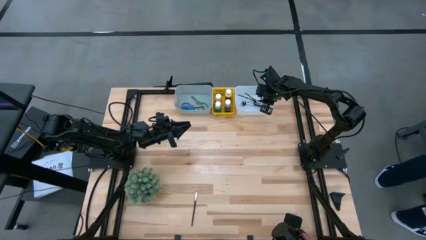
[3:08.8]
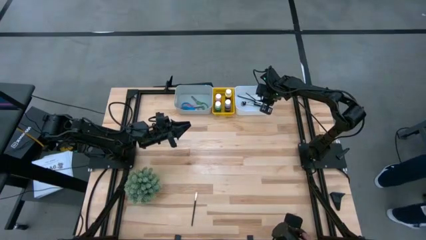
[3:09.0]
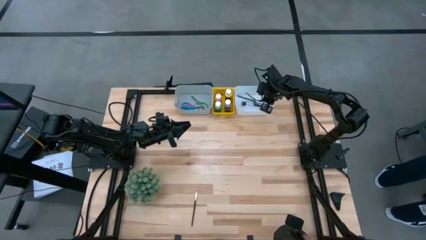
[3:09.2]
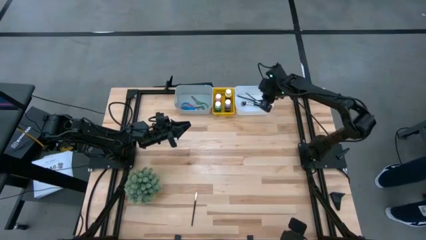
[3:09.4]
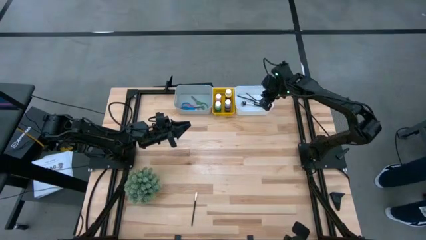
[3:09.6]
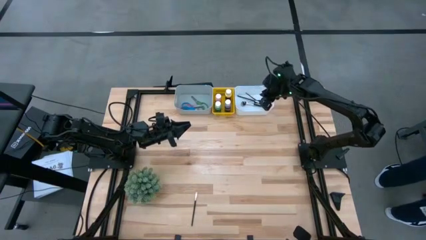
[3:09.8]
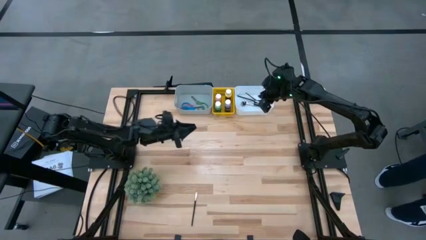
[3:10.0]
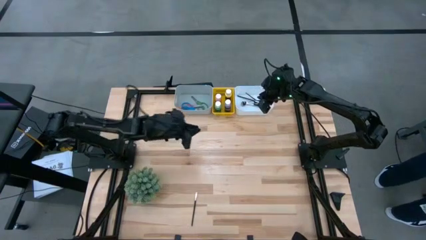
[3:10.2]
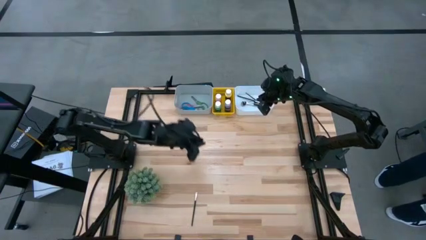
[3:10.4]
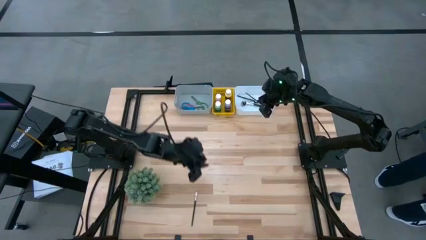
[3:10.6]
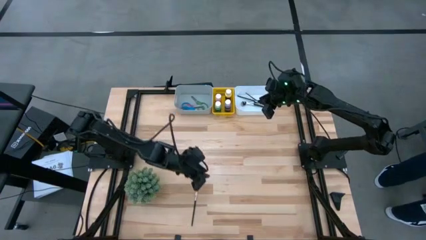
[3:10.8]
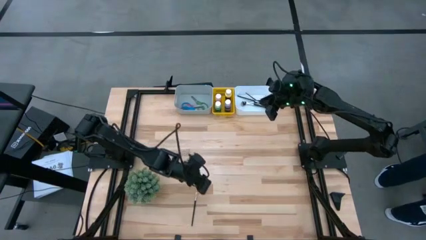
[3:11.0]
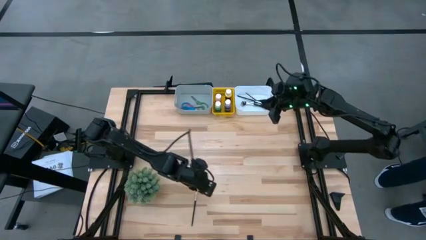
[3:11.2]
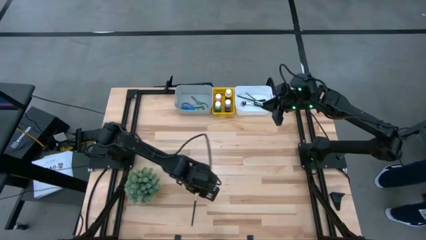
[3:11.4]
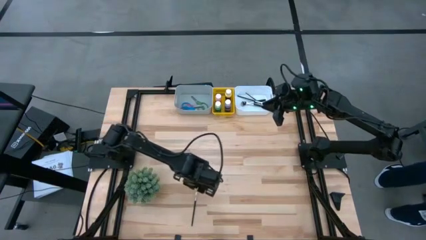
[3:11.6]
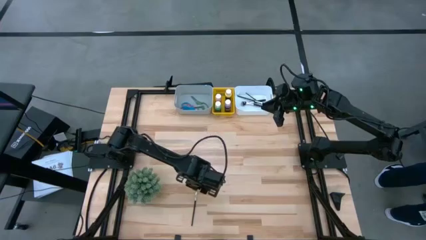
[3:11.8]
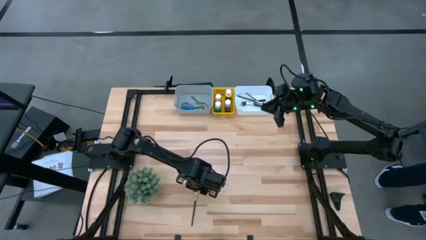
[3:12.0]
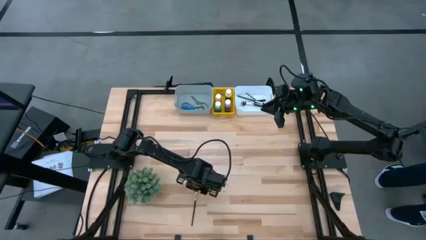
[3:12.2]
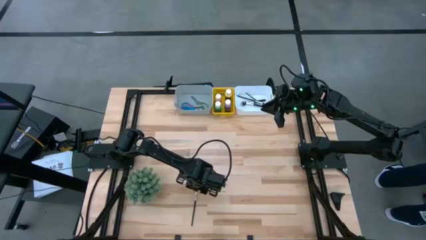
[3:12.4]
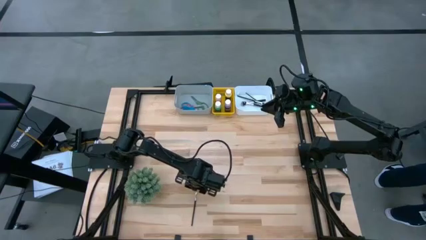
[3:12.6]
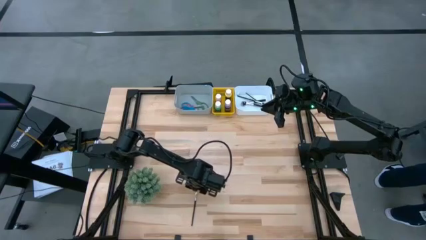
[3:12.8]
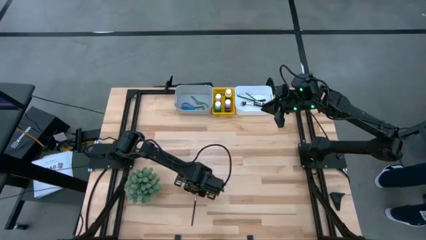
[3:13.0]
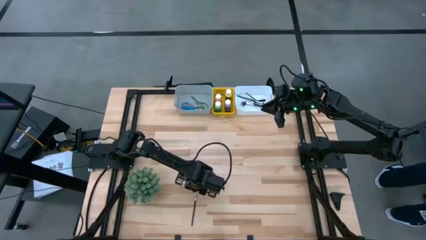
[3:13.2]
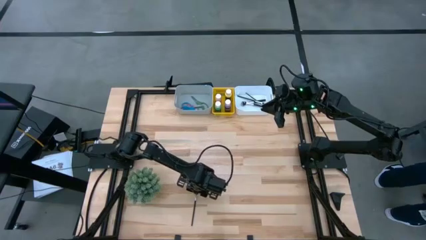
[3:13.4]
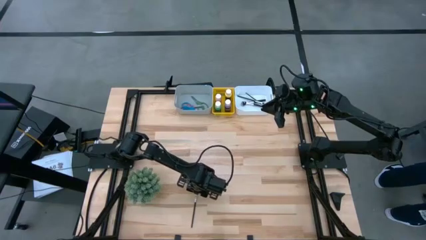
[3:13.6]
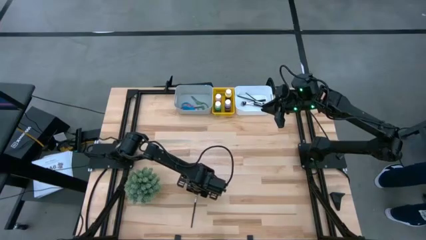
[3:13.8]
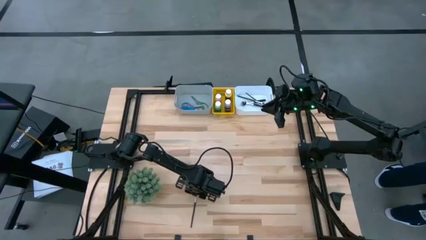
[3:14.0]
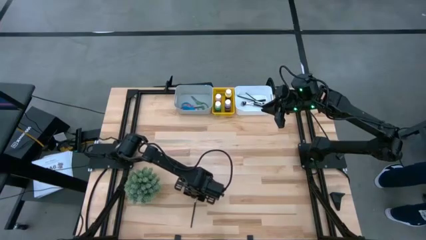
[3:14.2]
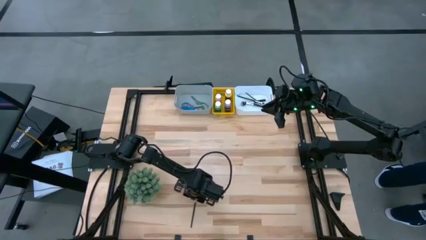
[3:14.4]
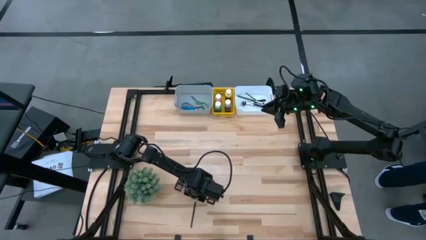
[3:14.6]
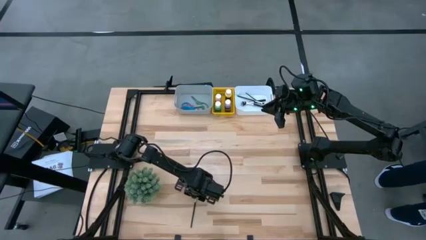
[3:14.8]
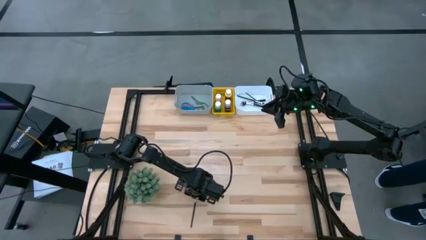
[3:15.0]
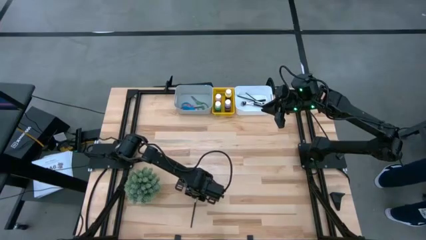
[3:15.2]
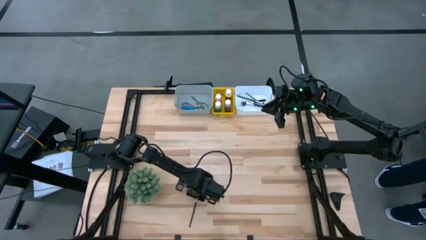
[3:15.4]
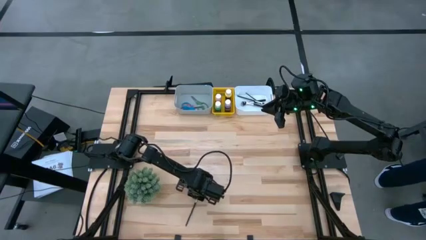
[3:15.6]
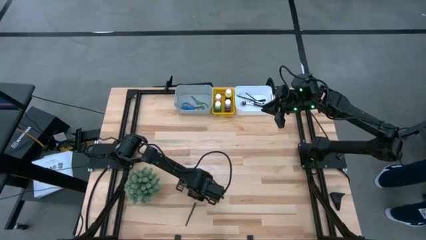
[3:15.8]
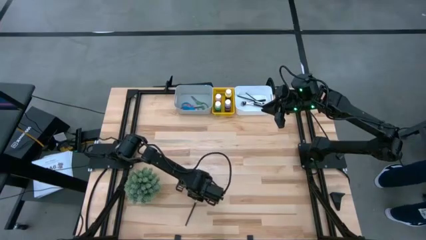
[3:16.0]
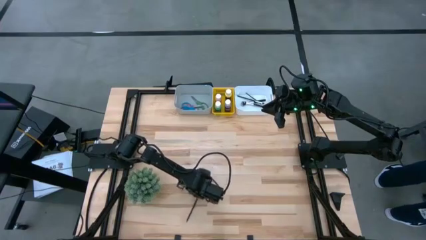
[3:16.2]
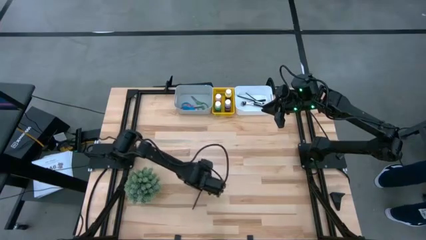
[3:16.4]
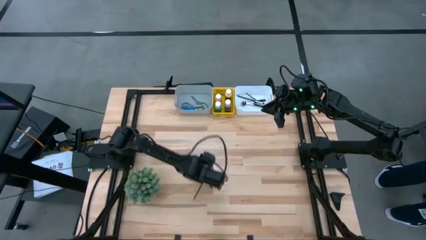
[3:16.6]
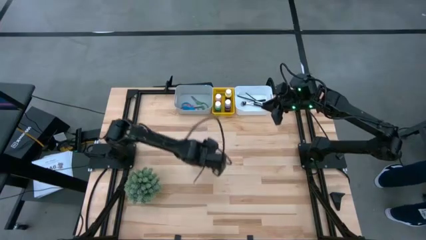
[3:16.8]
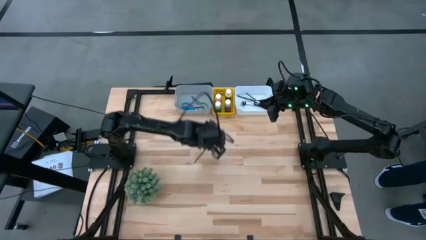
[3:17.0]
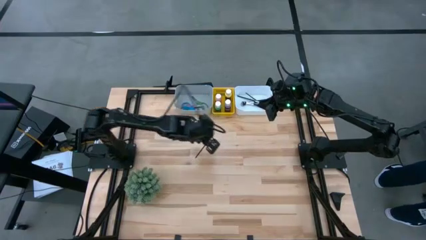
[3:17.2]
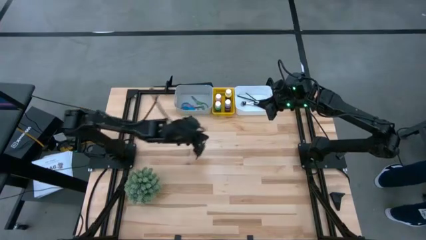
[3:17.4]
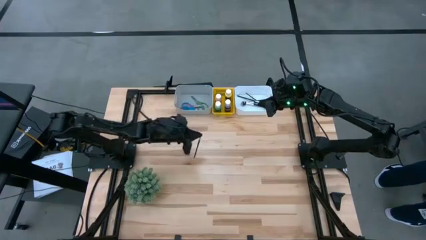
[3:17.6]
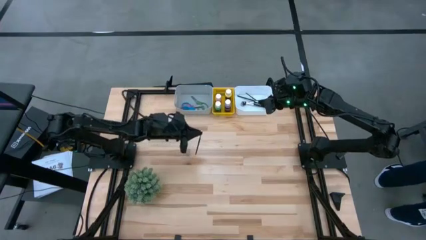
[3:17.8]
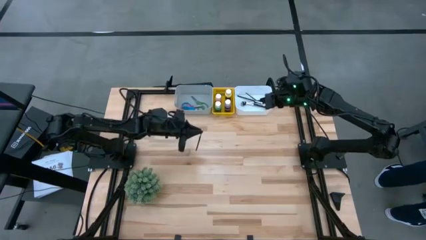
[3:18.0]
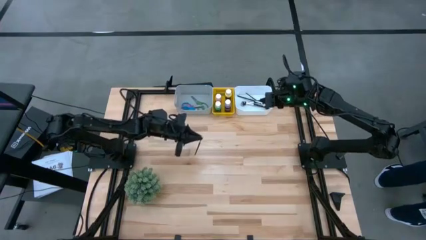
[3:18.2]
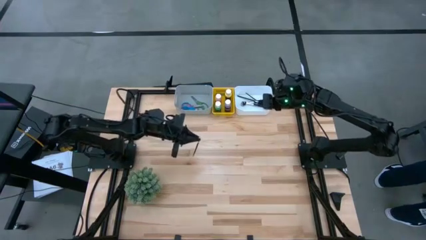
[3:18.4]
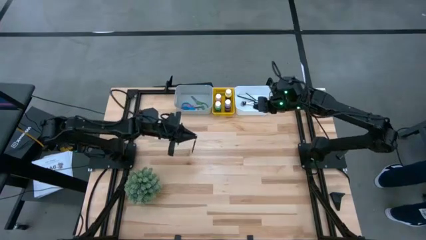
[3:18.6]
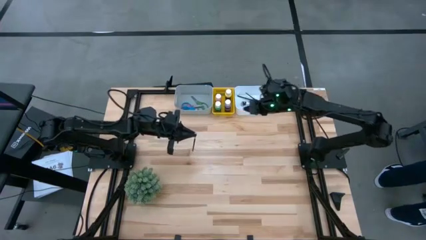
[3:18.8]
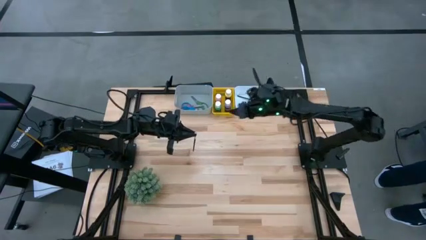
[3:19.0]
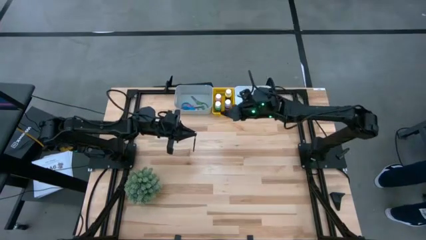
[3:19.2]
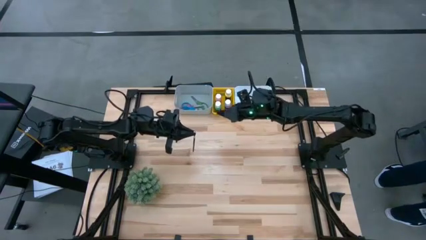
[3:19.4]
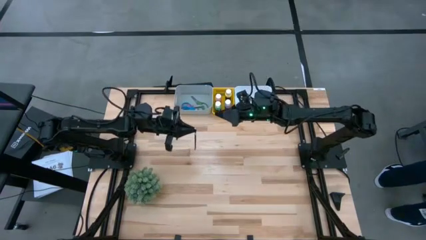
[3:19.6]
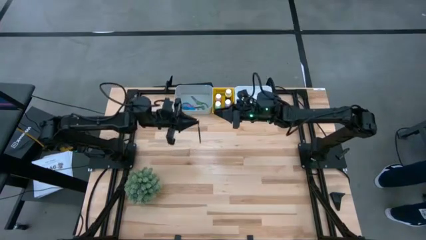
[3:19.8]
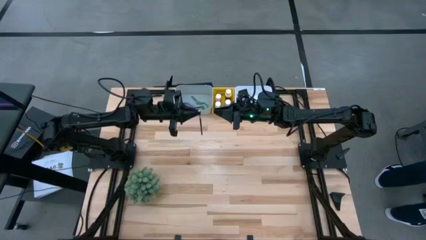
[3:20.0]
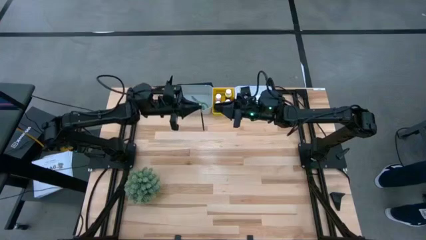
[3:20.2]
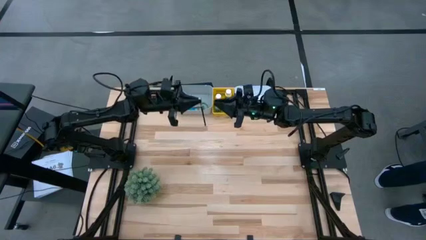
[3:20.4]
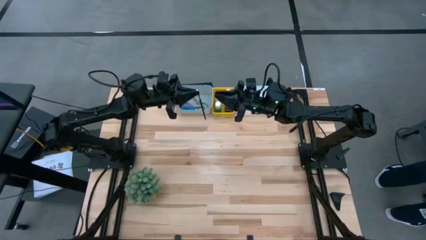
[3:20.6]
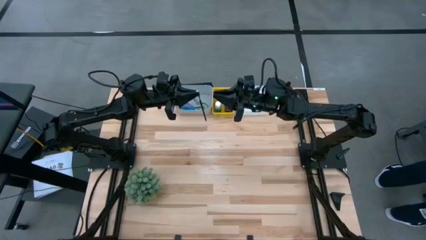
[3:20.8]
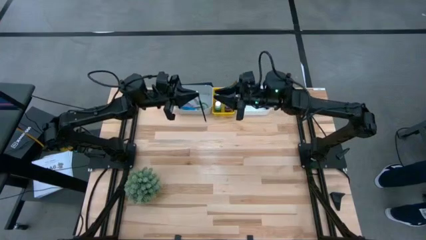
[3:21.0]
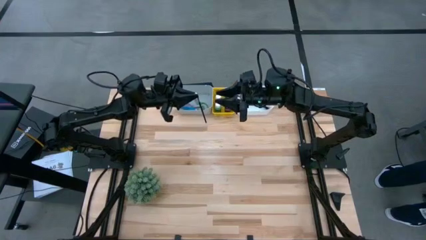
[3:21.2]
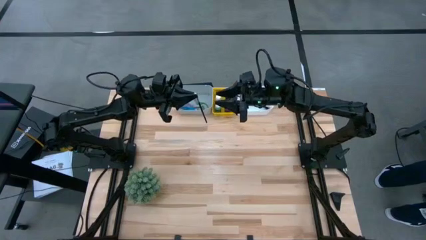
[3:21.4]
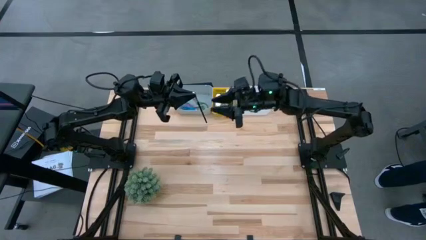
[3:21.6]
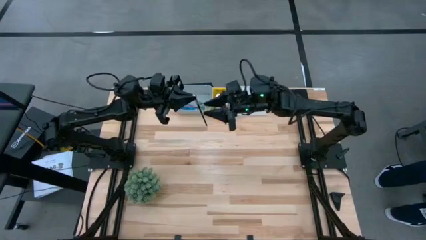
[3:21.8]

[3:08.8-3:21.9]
Task: Pick & Place Paint Supplies
Put the eyeshadow brush into the white bin

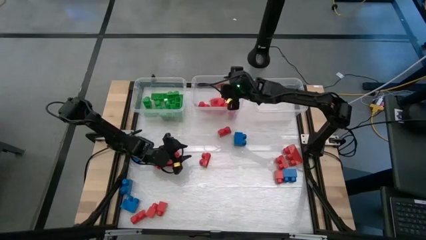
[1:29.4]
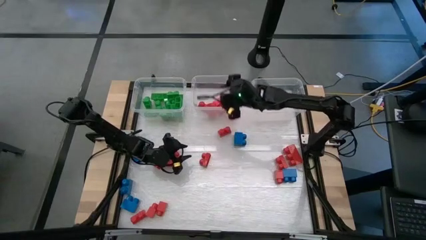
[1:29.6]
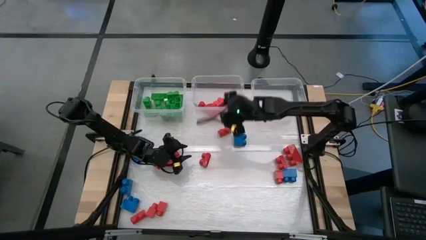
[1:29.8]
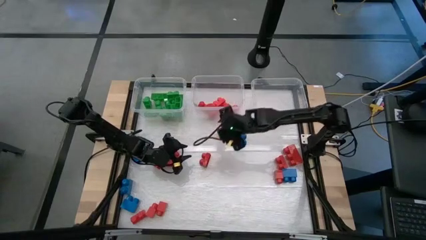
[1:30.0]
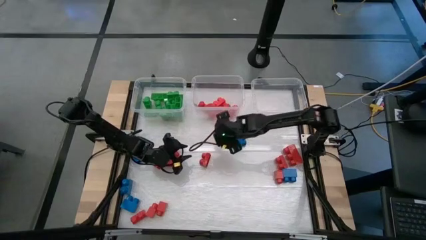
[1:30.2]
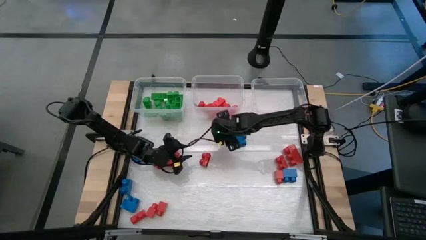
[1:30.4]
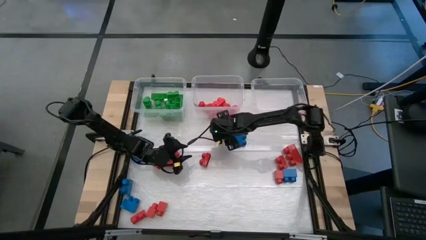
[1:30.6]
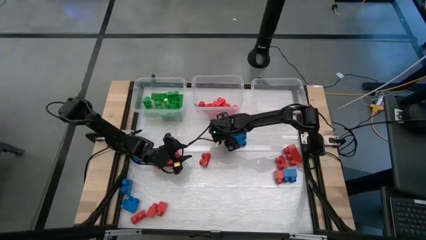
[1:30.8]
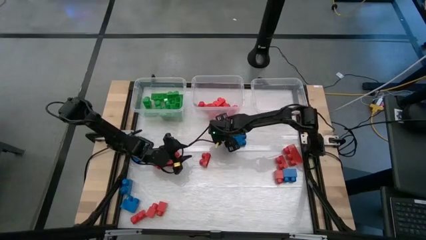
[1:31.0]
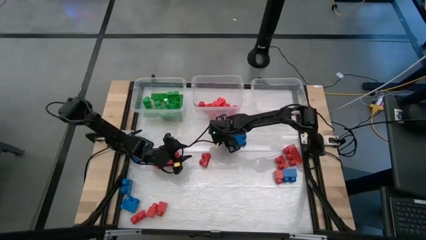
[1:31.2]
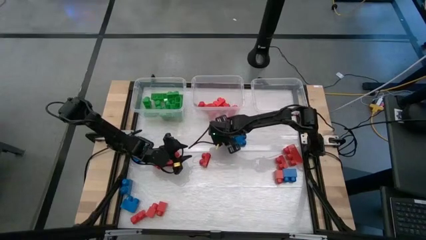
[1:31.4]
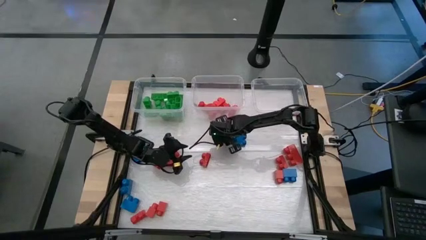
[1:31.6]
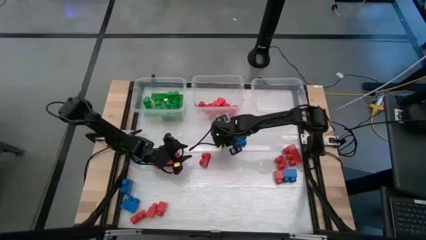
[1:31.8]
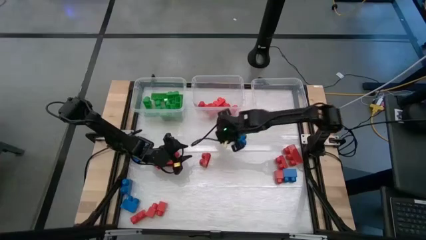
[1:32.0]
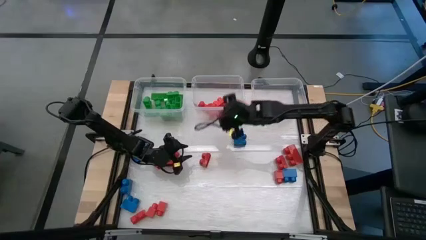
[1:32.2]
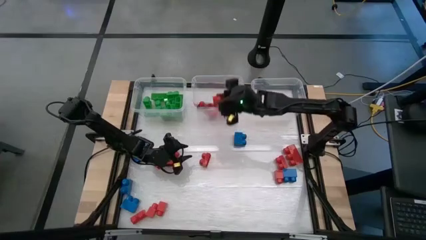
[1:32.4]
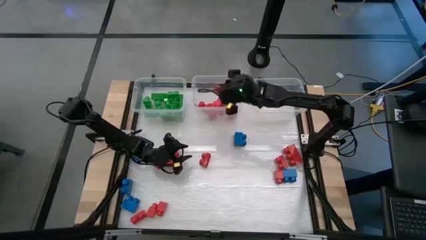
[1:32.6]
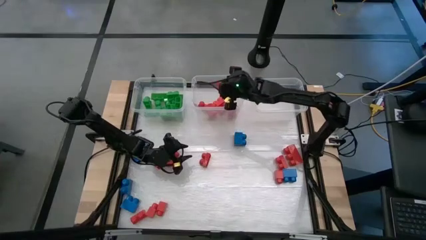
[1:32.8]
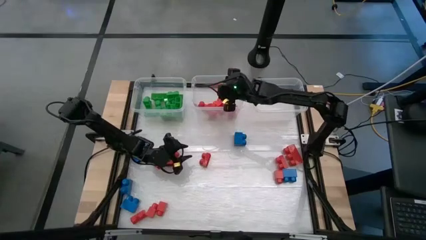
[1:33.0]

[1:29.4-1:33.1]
Task: Sort blocks
Put the red game piece into the middle transparent bin
